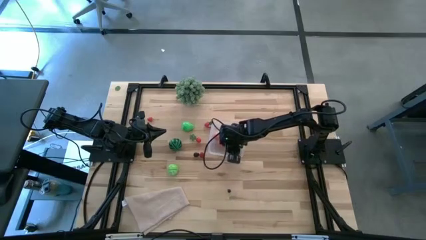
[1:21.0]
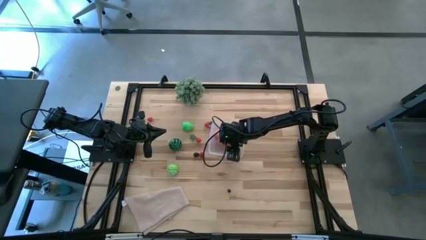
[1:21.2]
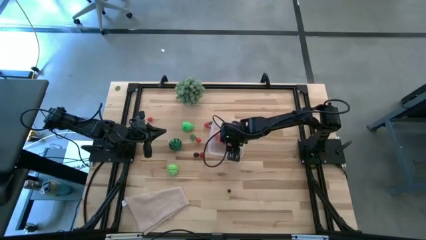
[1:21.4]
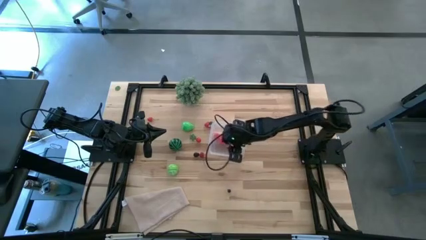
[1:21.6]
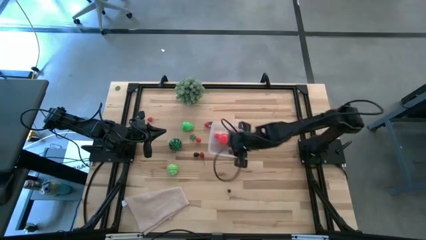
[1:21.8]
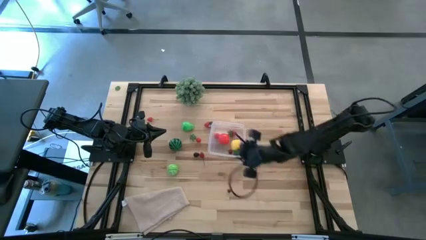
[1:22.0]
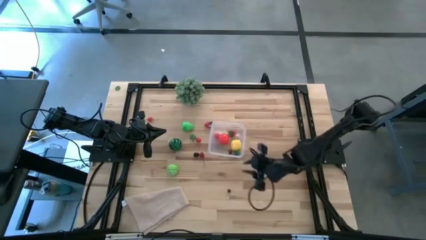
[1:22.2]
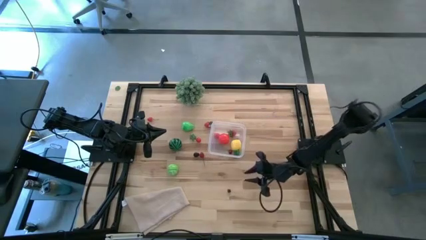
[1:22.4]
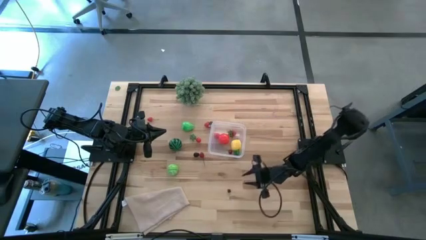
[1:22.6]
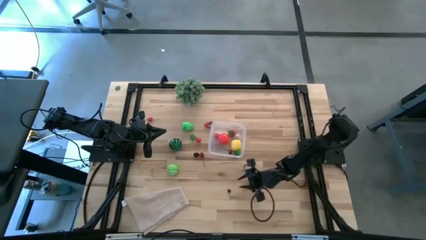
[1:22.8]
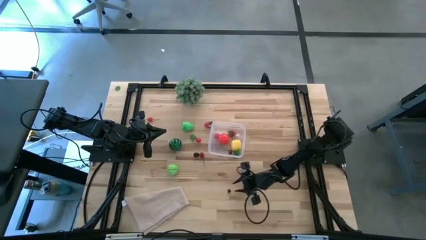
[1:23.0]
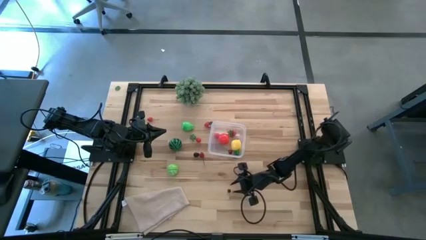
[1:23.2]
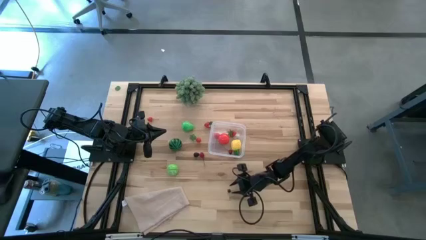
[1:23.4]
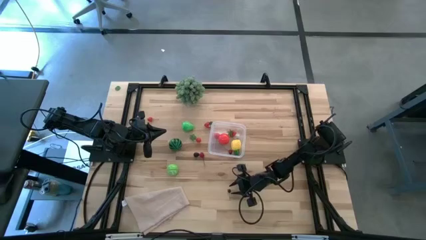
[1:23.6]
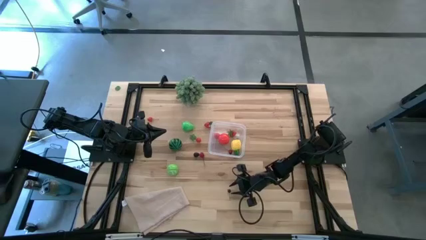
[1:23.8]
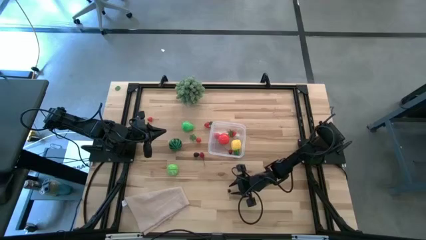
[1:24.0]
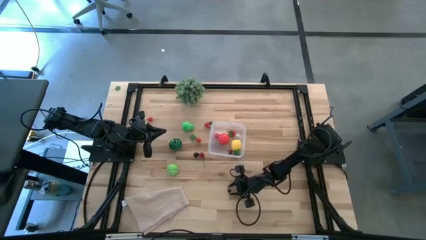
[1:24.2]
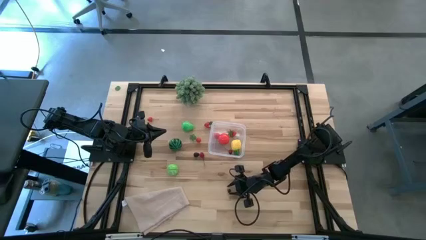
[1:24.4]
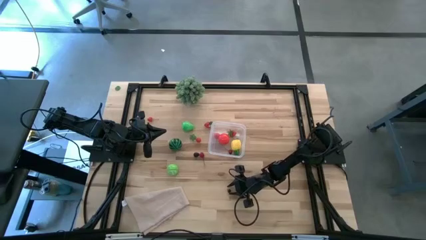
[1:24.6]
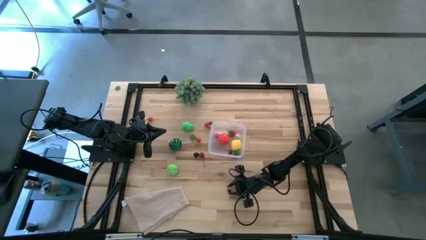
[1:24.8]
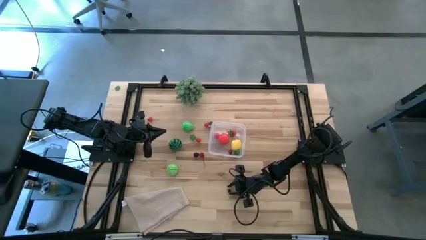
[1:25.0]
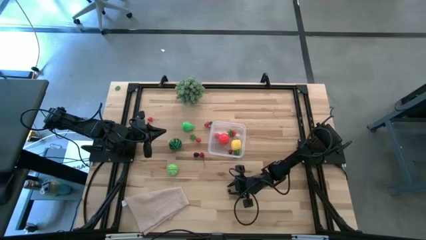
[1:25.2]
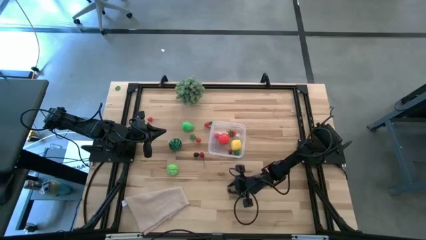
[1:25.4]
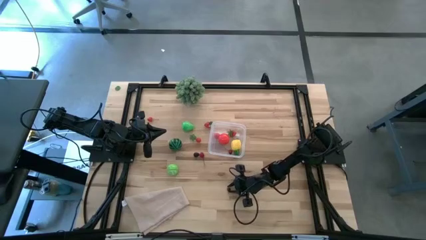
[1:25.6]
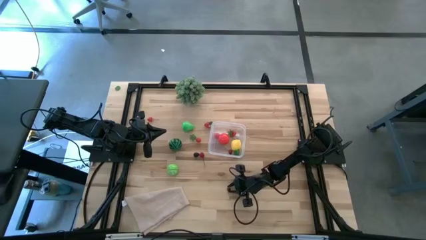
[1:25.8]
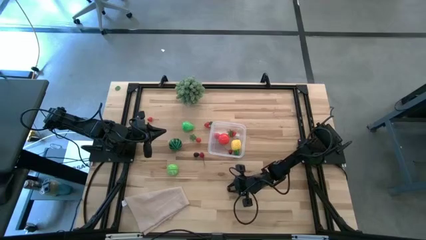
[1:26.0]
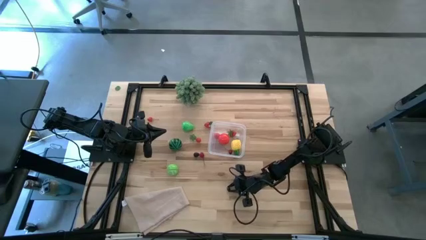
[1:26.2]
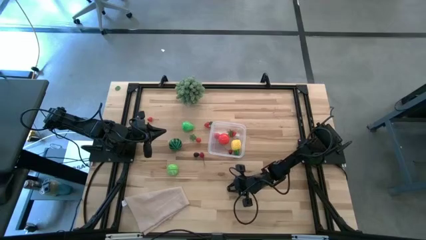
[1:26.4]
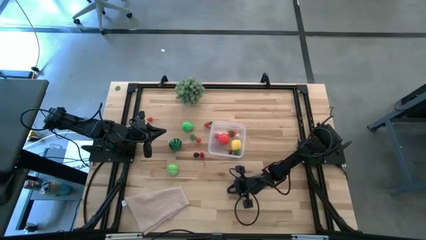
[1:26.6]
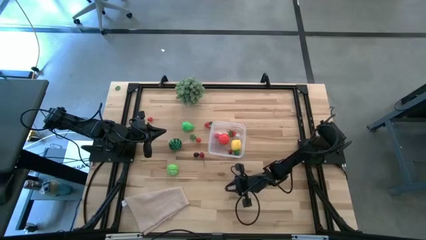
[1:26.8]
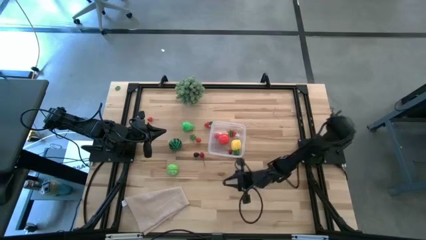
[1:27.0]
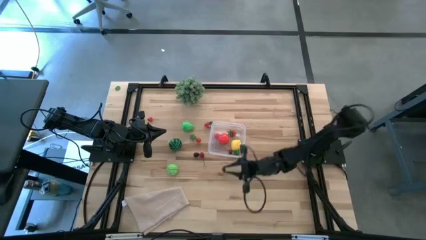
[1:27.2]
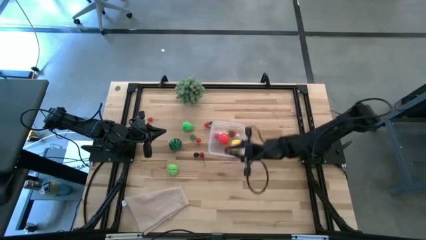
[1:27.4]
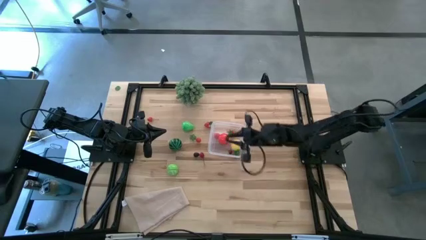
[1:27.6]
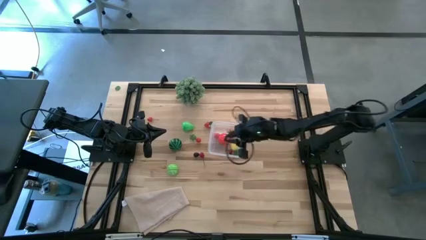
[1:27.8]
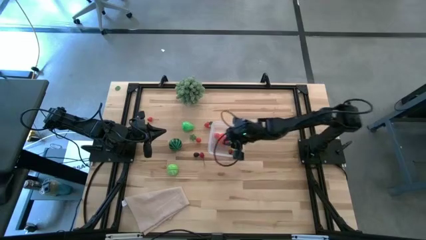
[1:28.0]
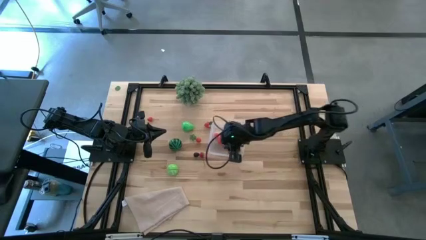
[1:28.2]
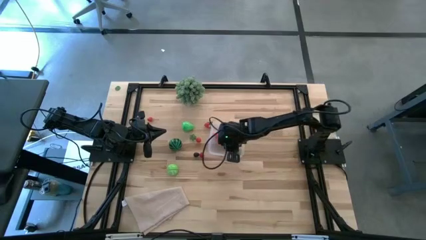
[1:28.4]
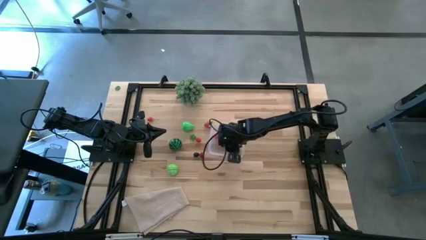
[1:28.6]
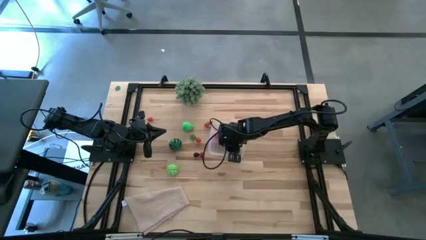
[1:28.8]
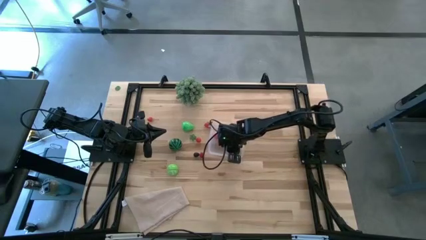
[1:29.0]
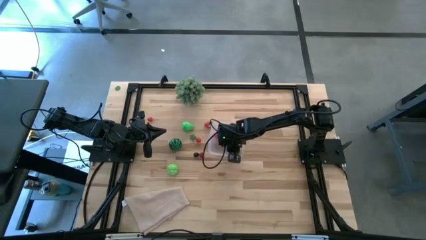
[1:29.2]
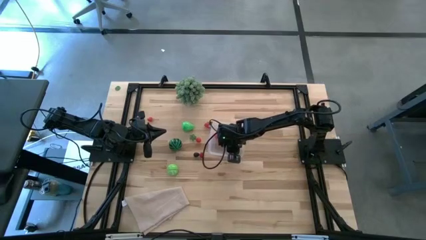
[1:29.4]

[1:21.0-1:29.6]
Task: Pick and placing Produce into tupperware
Put the blueberry into the transparent bin

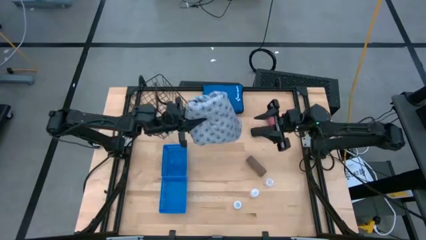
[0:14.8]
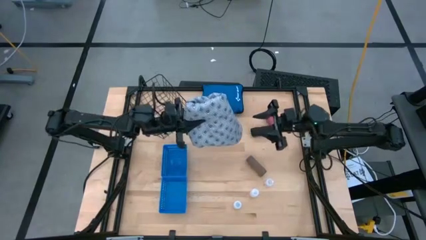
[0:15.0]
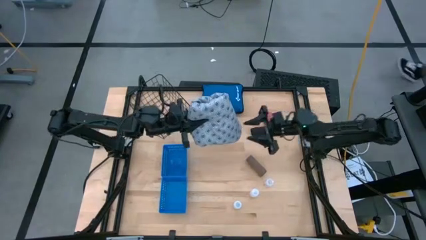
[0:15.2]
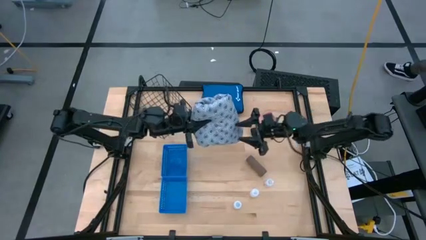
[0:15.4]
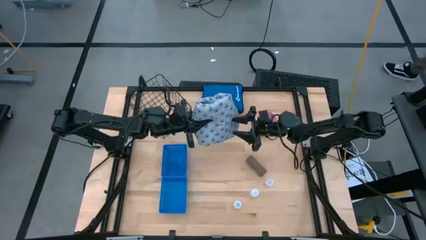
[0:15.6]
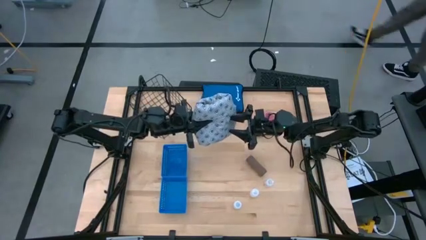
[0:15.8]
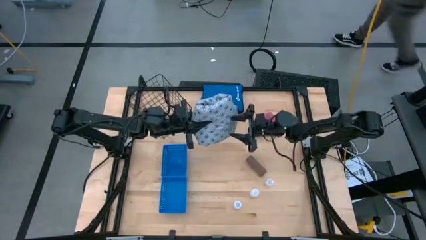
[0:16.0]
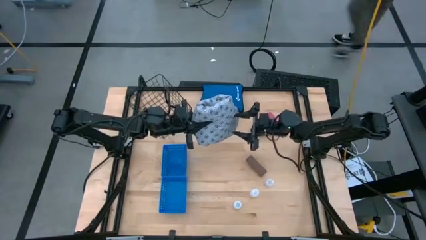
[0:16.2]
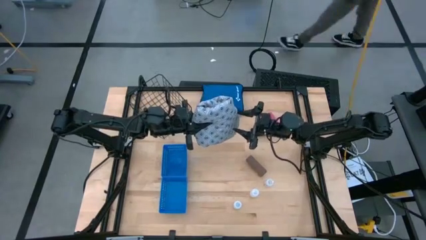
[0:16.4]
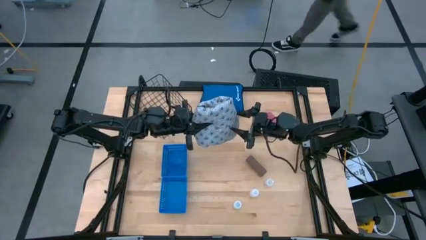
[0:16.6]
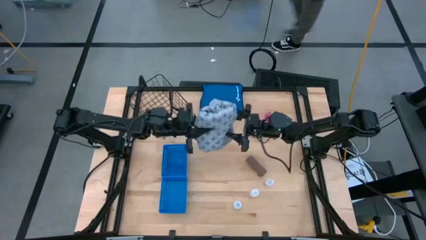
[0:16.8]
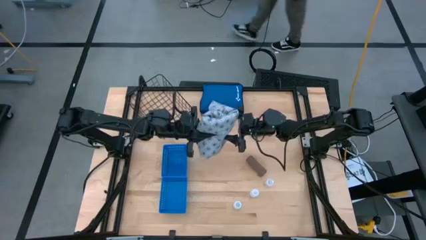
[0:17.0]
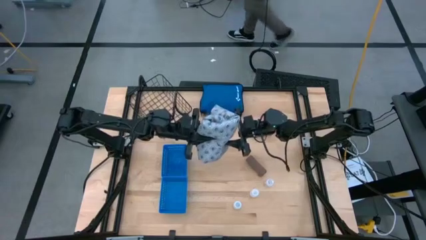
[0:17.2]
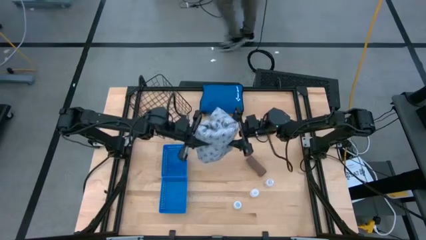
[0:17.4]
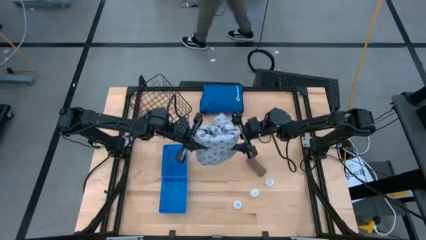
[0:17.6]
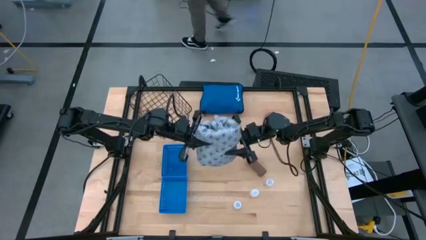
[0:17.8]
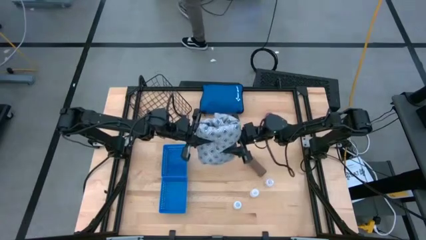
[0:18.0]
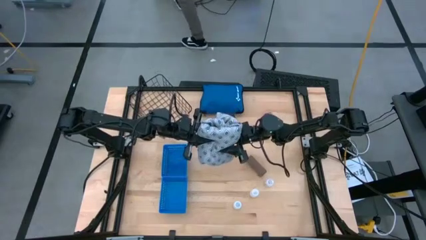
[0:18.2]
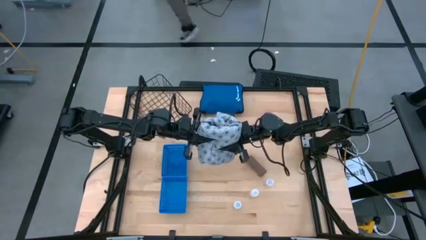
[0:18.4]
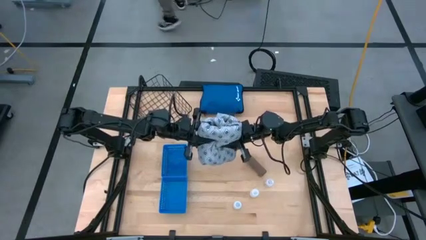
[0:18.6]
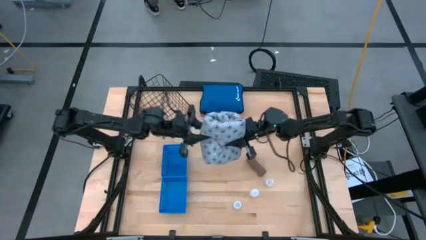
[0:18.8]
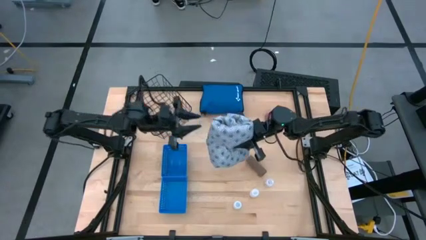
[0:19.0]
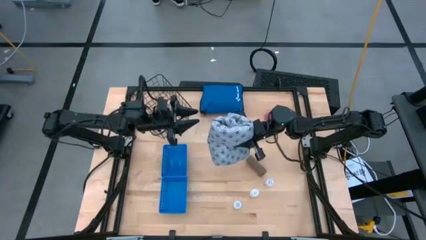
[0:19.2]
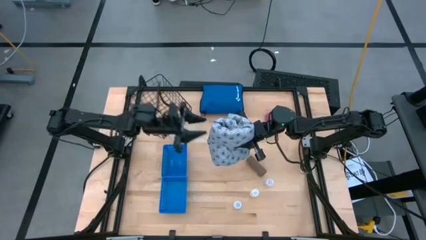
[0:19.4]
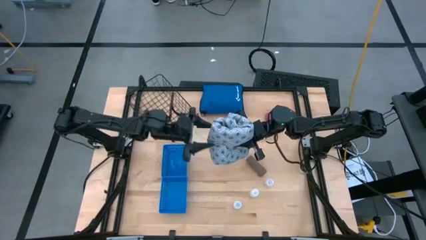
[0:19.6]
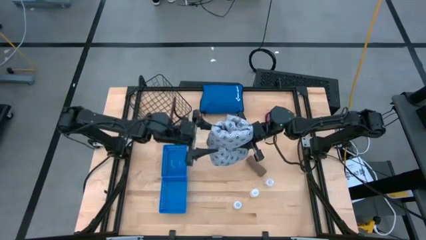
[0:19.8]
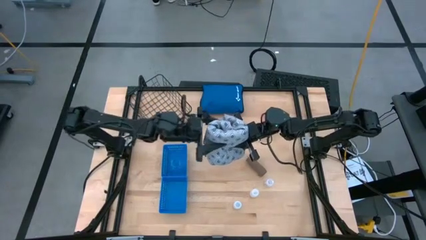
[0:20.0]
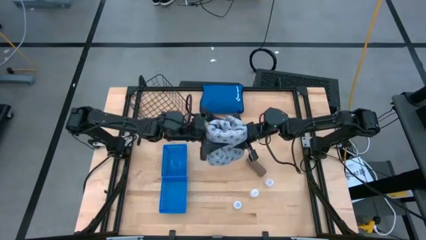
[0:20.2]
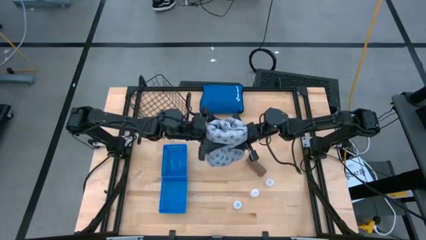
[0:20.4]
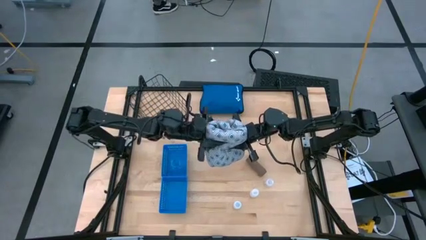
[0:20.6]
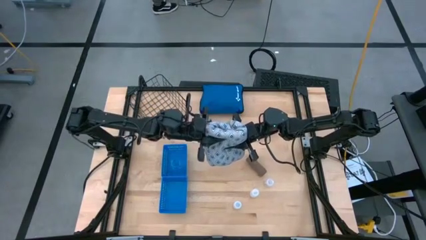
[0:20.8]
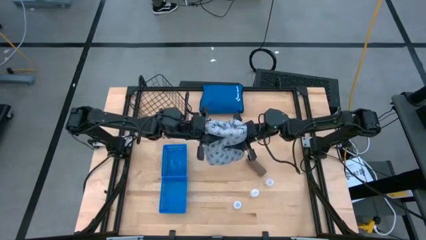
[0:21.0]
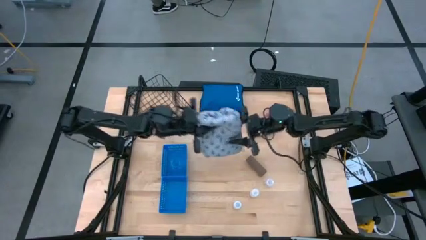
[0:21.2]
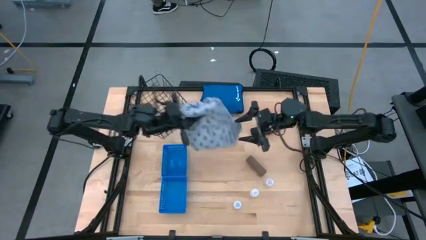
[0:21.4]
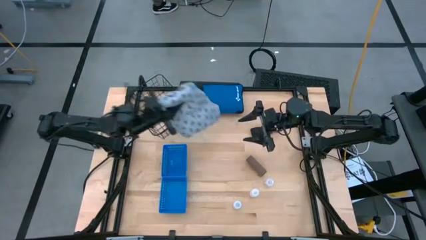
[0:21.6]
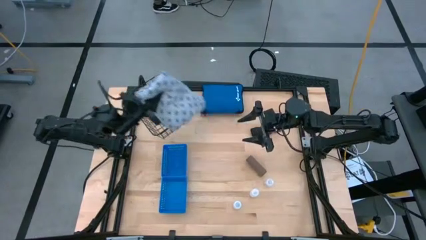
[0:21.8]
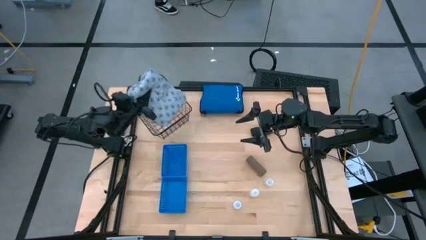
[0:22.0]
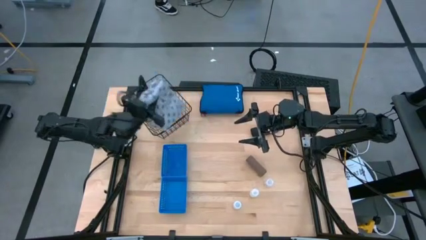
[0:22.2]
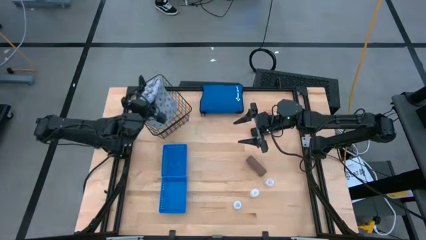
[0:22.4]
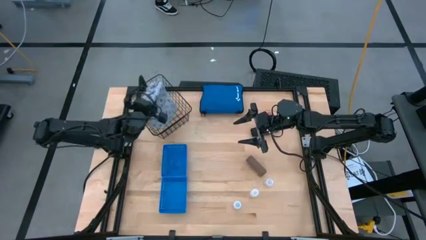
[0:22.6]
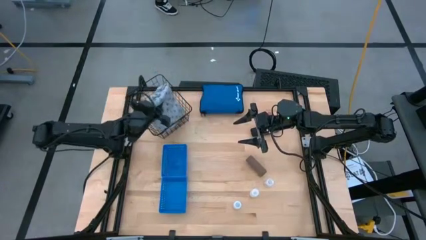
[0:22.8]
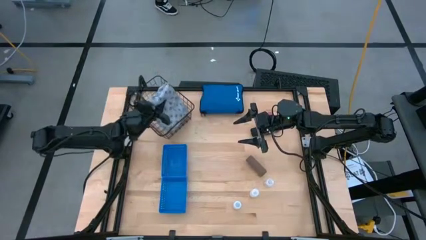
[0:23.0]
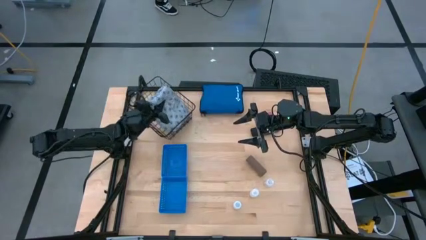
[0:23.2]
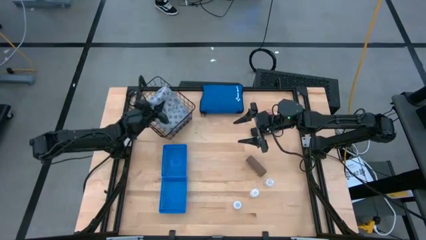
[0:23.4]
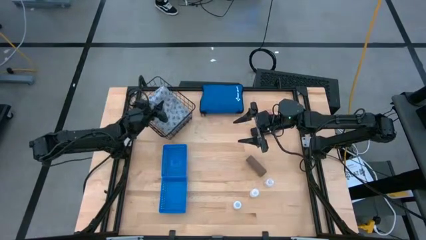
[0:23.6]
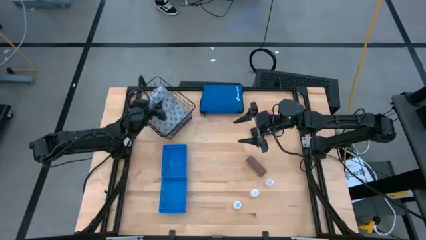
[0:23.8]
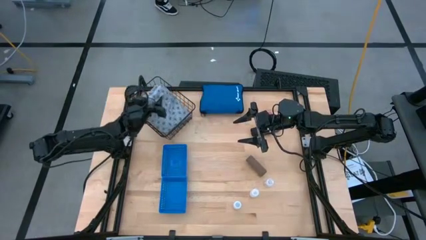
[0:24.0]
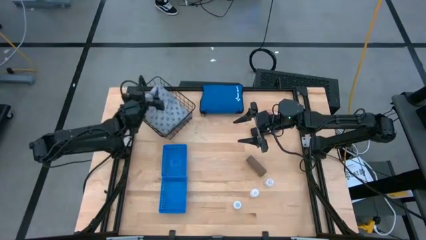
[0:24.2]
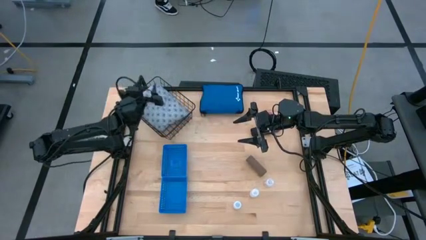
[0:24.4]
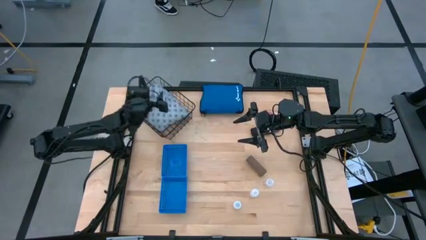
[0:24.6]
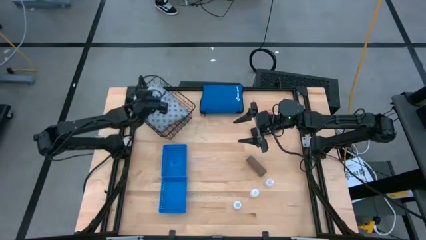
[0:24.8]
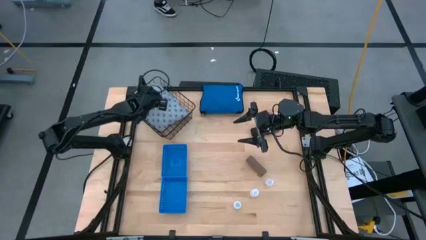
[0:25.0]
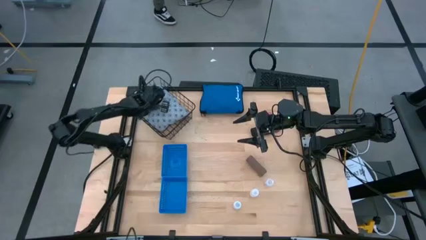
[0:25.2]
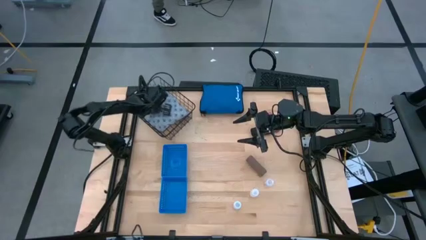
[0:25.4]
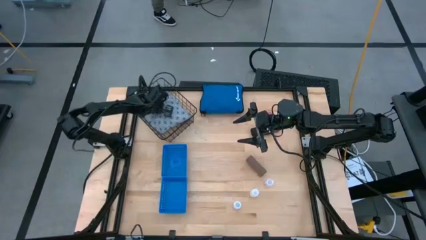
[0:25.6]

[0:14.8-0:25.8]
Task: Pick & place medical supplies in basket/bin
Put the folded gray patient gown into the black wire basket
